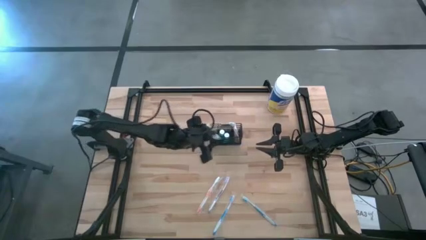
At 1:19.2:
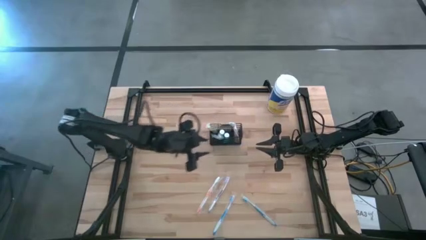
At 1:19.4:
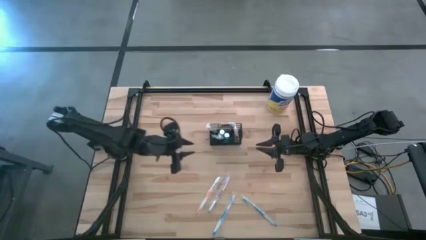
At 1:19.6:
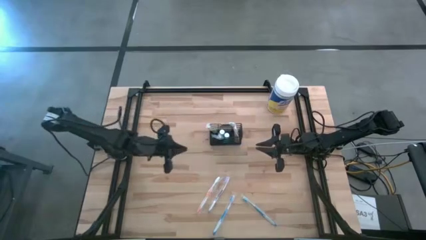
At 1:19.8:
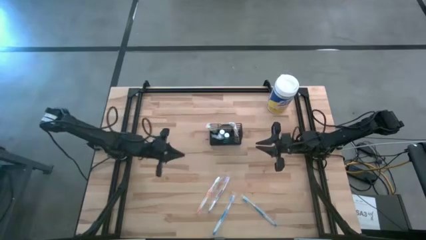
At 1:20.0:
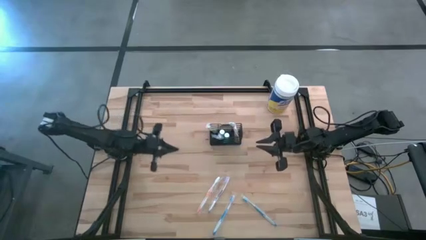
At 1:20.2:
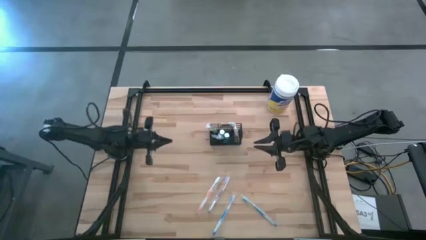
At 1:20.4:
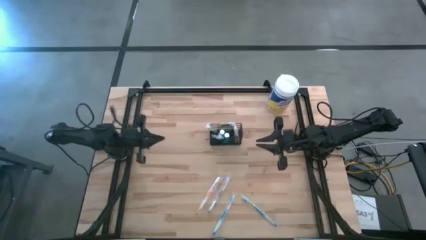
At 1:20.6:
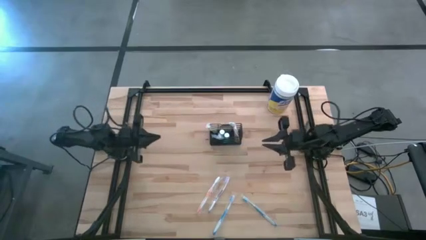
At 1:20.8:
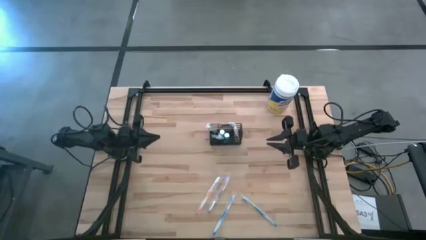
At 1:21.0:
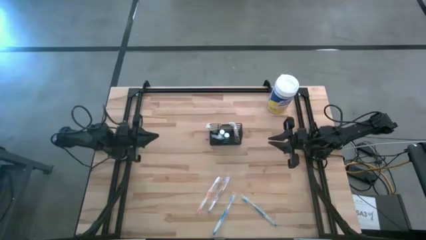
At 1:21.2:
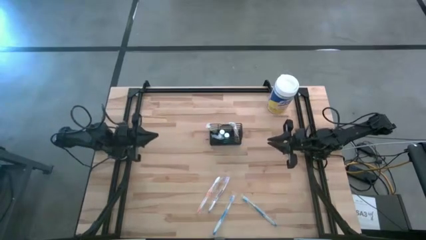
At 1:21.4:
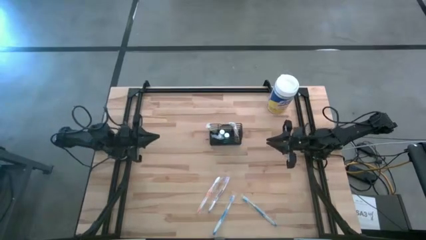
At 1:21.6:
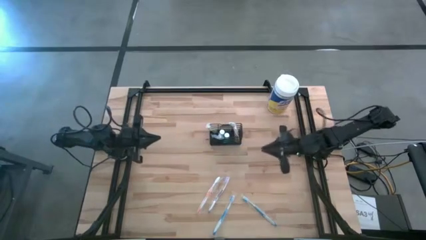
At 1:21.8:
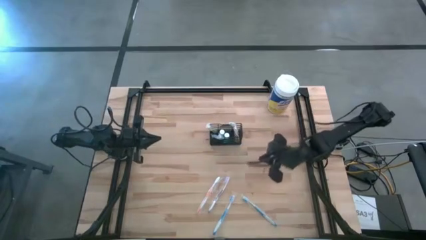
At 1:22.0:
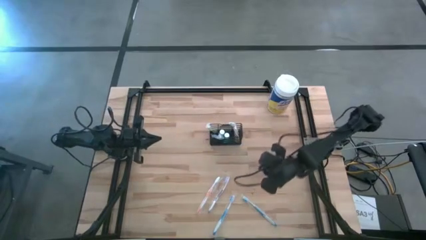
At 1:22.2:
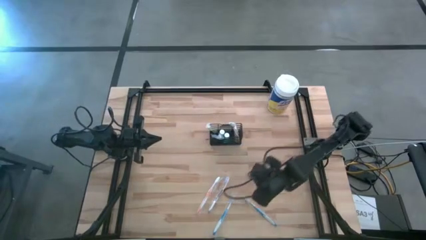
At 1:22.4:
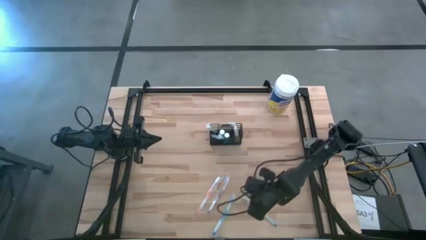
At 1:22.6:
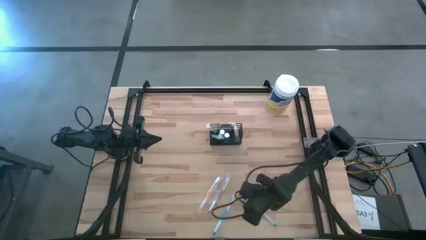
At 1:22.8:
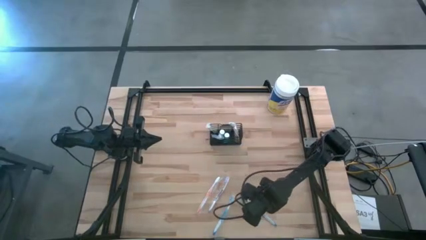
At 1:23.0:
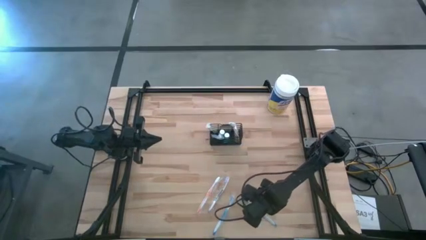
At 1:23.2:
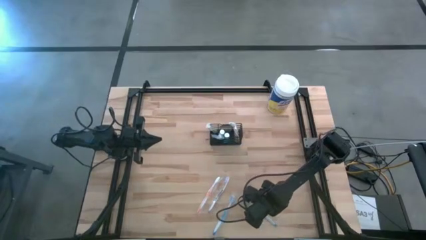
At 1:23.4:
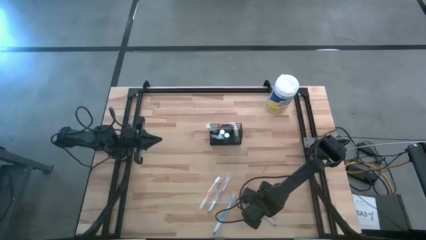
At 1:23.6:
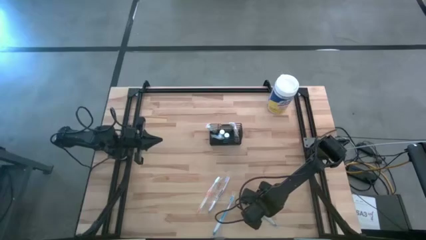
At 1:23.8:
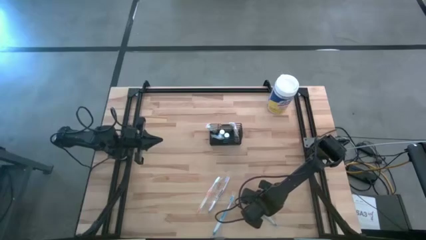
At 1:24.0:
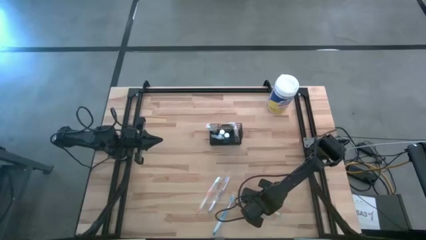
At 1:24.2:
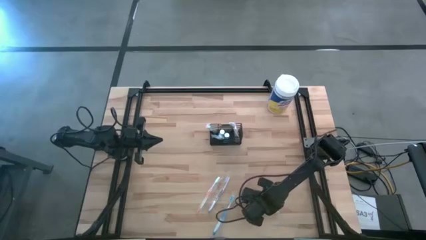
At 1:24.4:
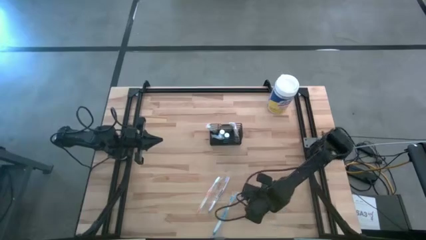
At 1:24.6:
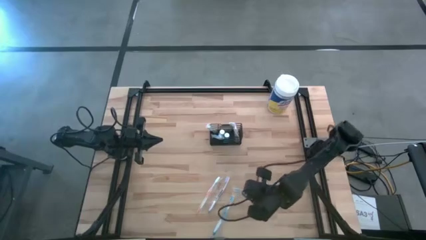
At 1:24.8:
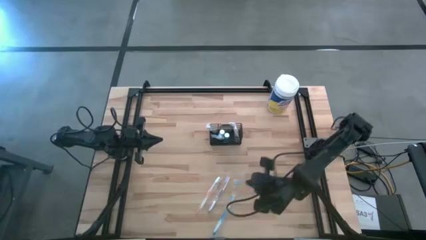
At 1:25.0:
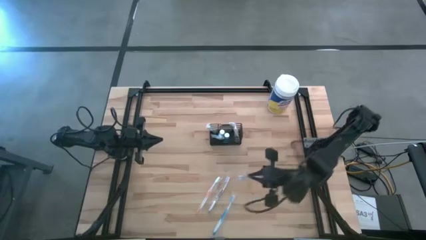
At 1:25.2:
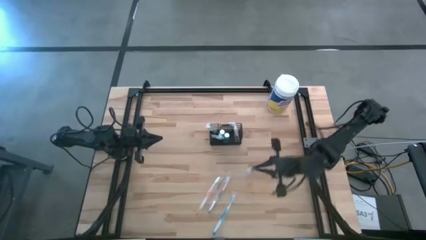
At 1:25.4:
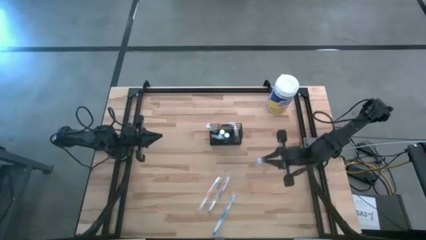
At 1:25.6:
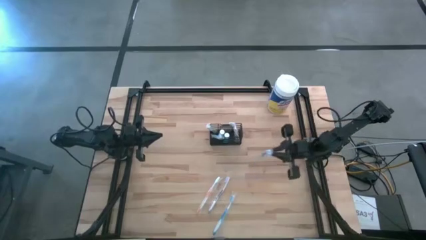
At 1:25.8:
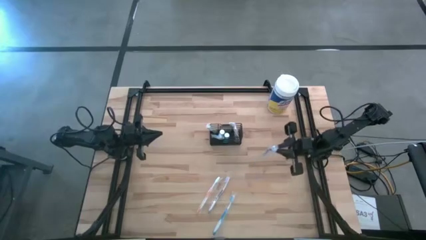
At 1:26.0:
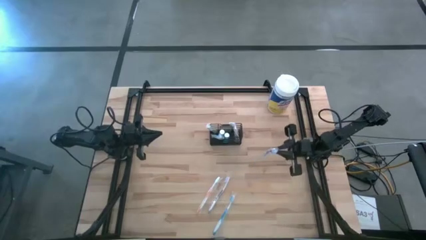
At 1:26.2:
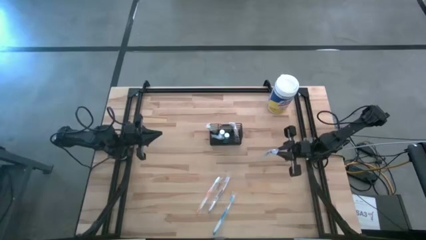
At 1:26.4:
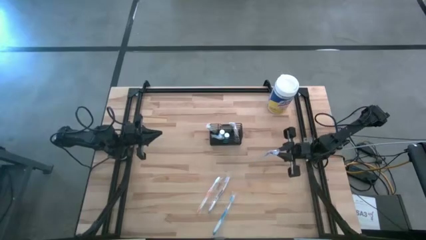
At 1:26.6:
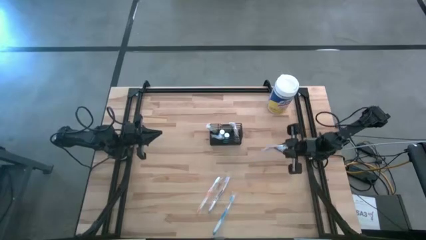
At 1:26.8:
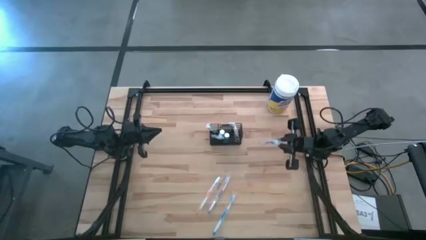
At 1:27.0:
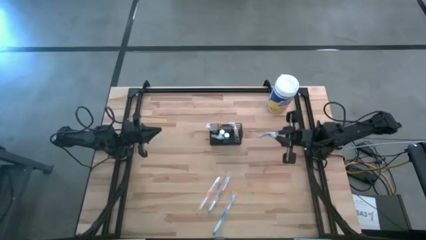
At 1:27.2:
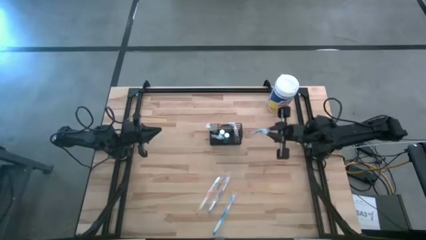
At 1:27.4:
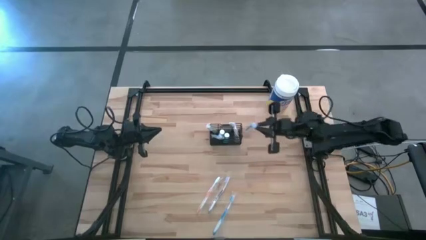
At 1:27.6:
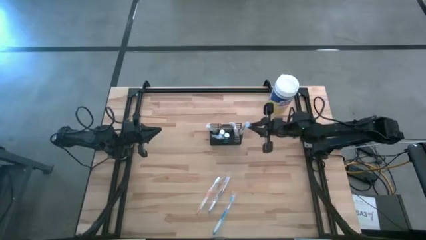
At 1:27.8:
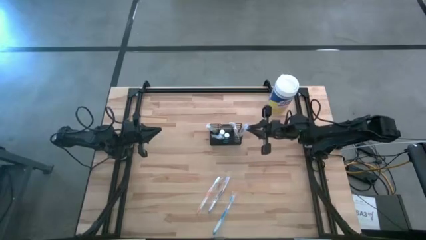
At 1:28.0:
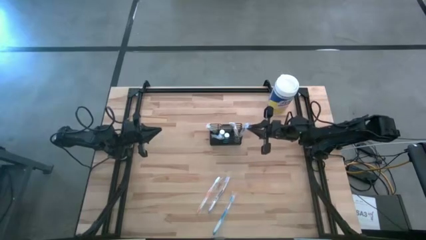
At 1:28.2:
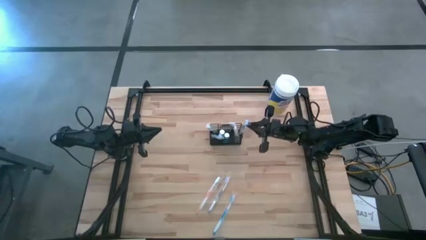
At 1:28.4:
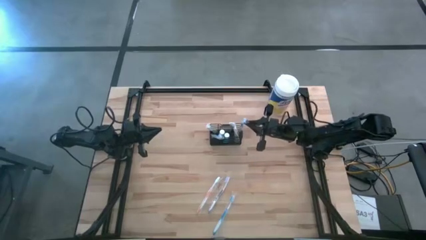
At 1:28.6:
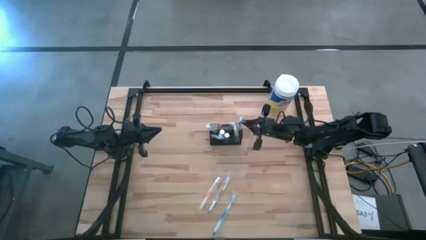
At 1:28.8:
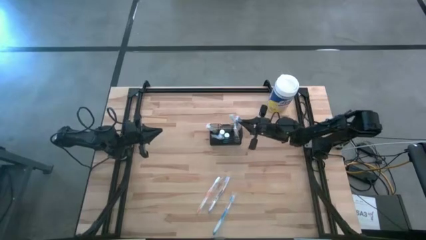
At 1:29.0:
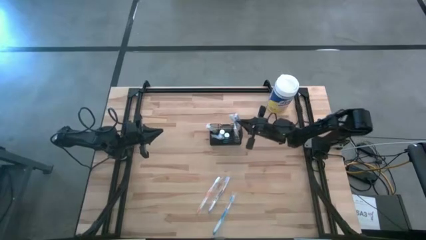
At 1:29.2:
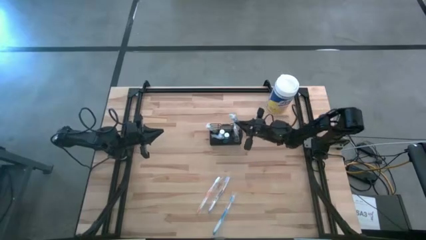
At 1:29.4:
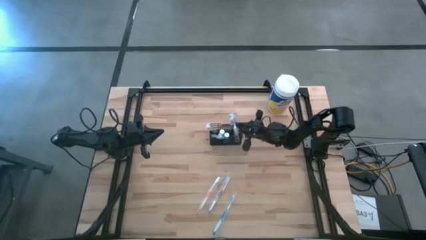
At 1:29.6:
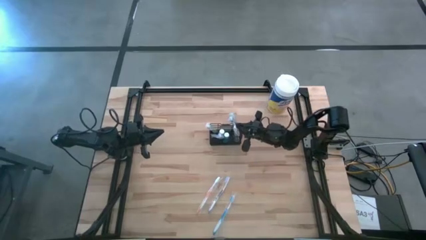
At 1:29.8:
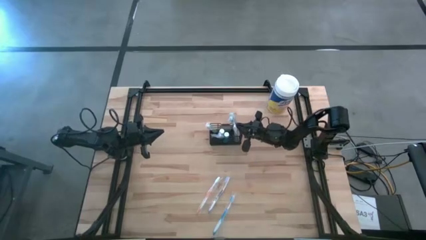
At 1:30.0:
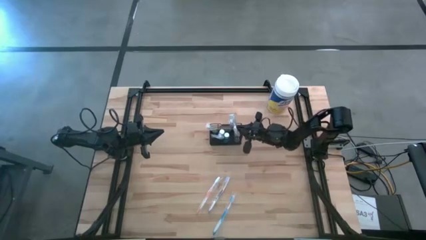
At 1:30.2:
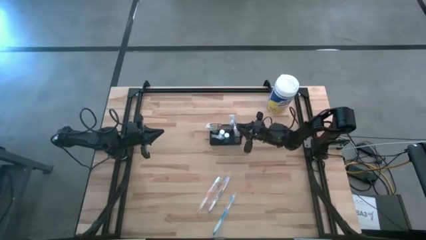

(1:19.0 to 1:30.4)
Task: Pick & Place toothbrushing station
Put the right blue toothbrush into the black wire organizer
